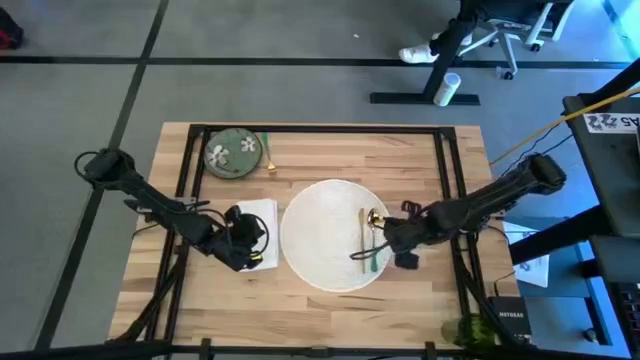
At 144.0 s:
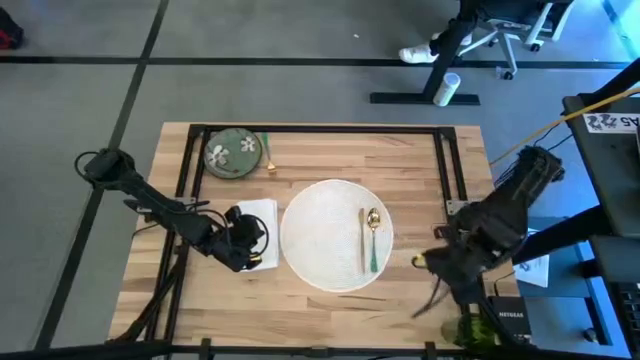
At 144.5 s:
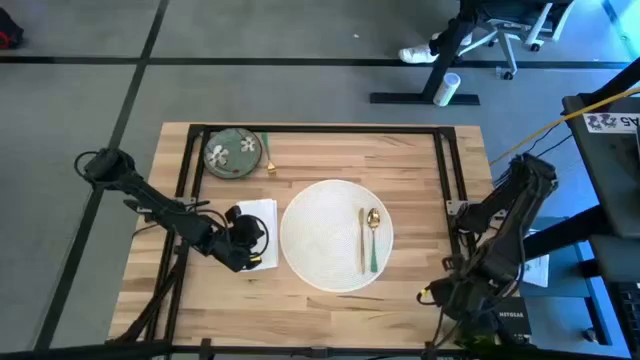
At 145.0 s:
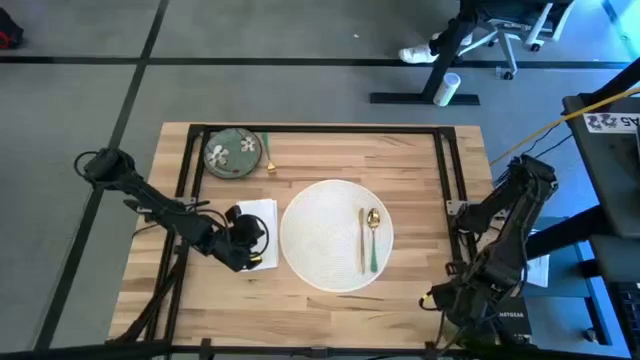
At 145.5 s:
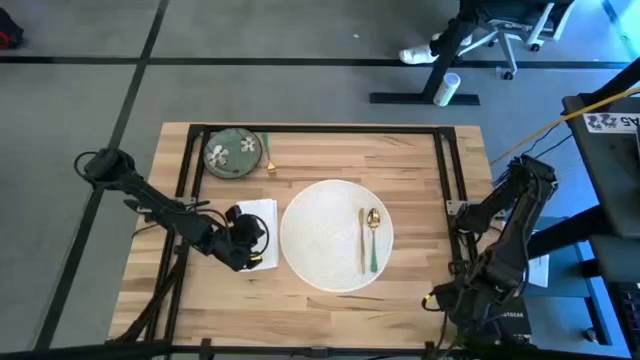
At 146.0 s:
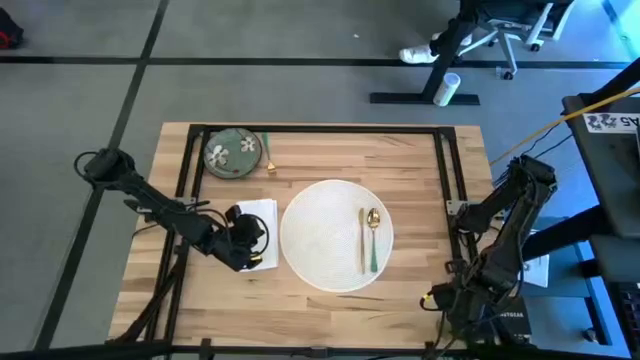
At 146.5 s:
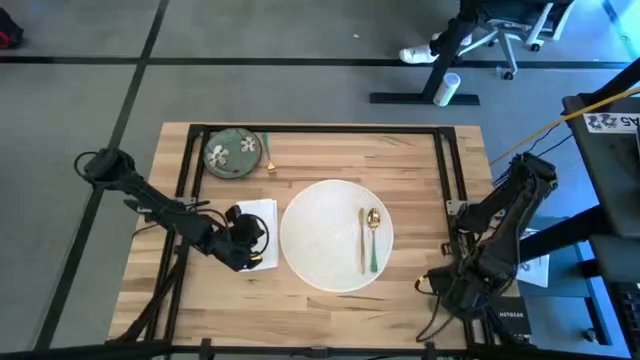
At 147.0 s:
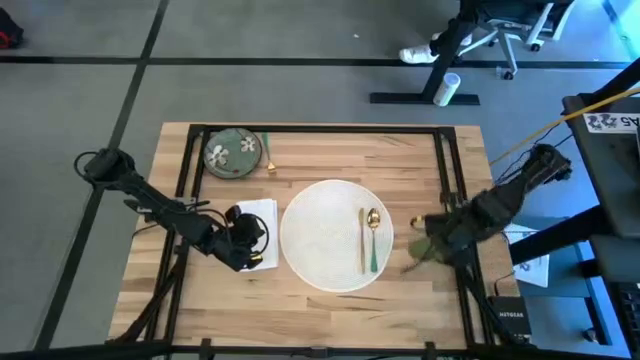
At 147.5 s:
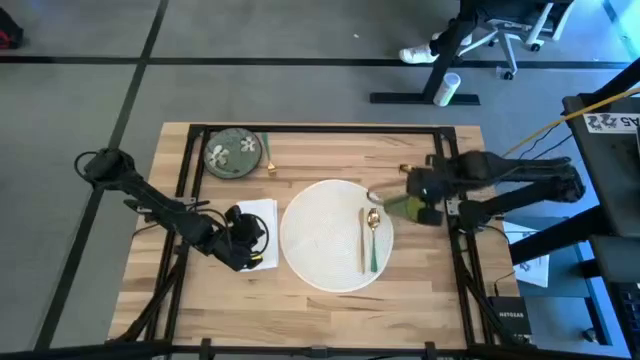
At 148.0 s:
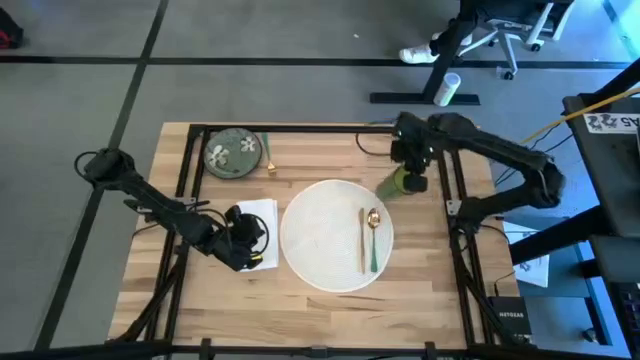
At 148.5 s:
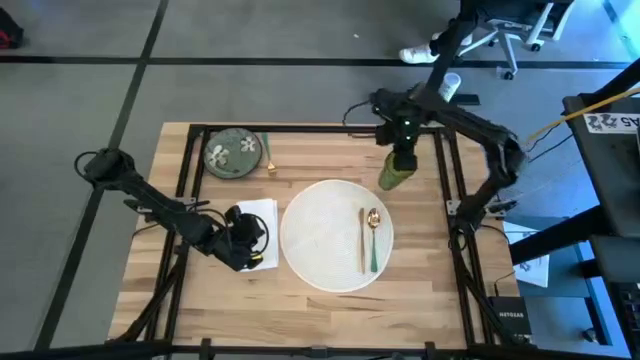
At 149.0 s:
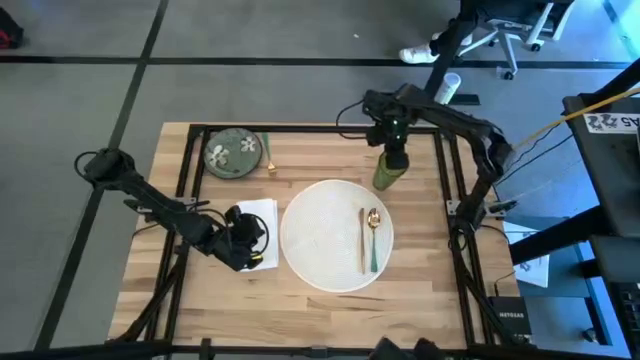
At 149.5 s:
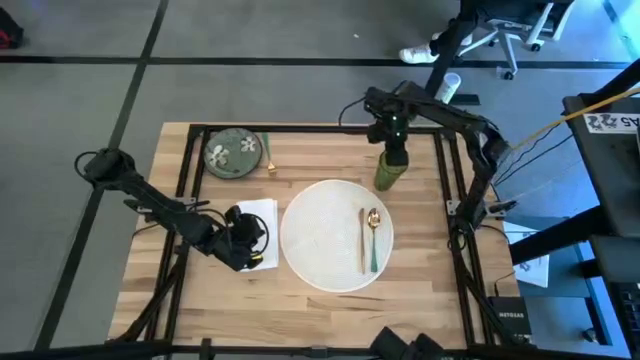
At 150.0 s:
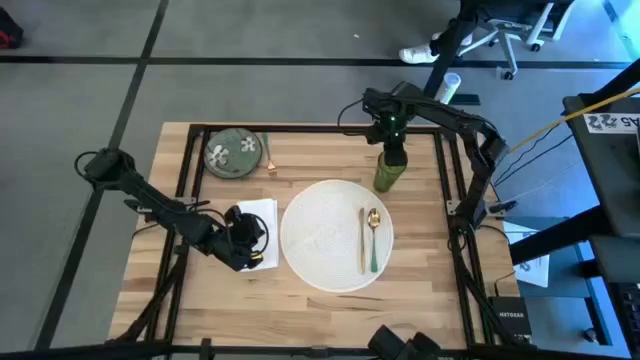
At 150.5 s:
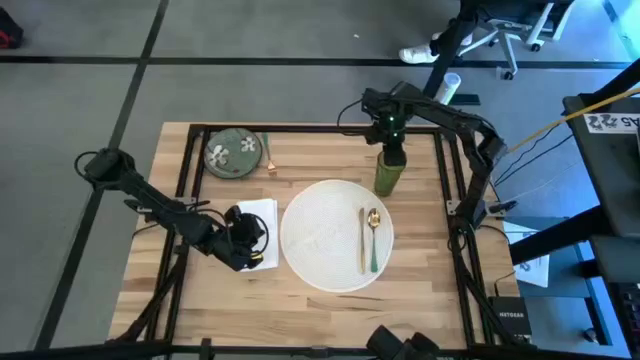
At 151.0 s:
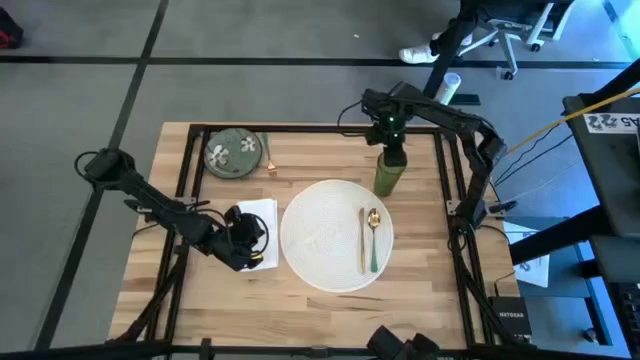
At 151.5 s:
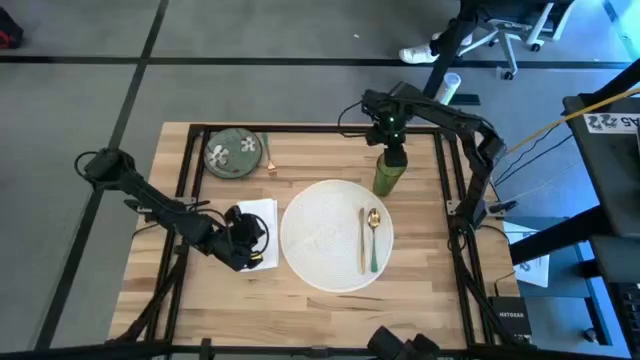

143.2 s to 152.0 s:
Task: Set table place
Move the green cup to the top right of the white table mat

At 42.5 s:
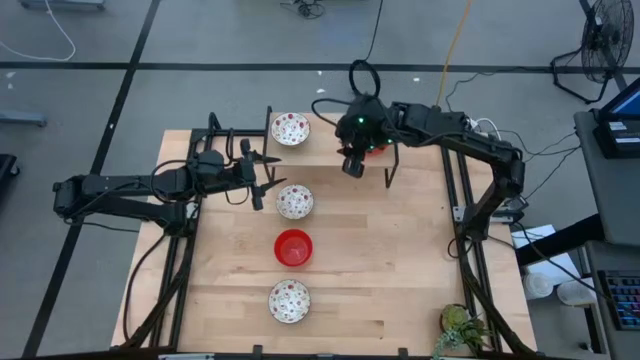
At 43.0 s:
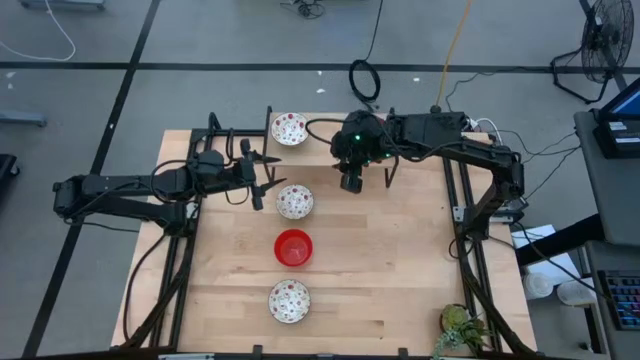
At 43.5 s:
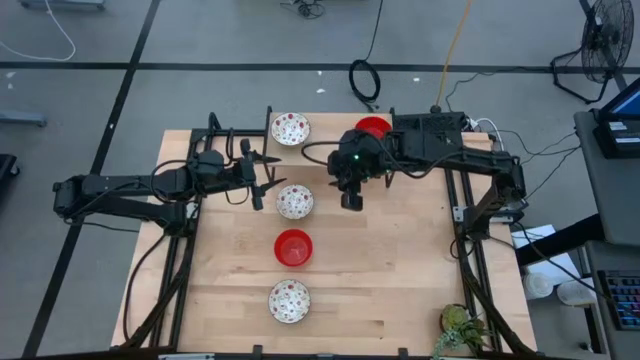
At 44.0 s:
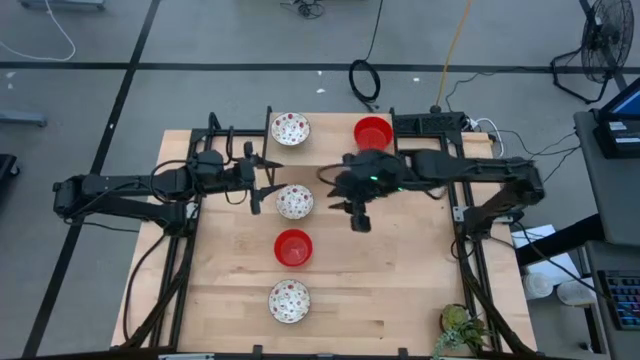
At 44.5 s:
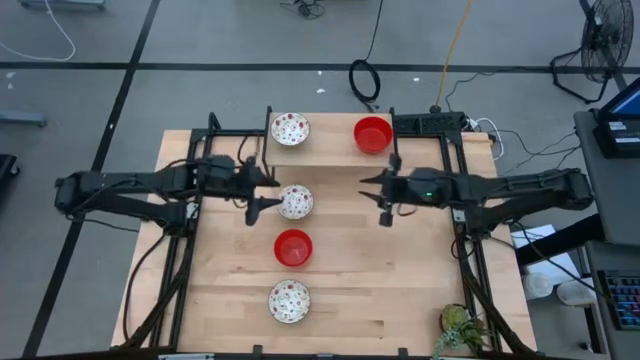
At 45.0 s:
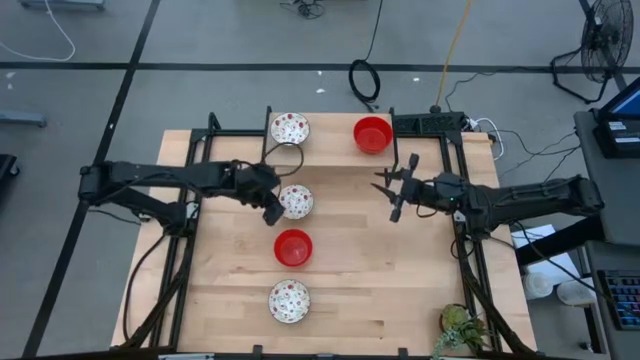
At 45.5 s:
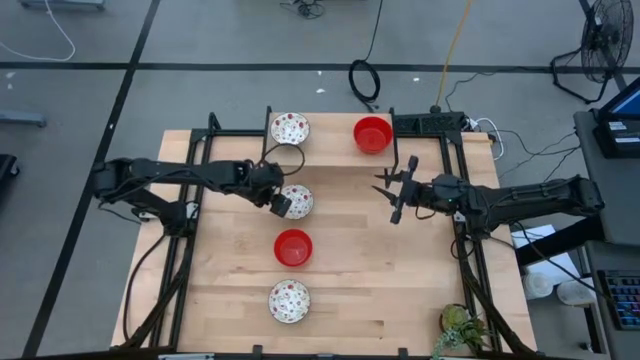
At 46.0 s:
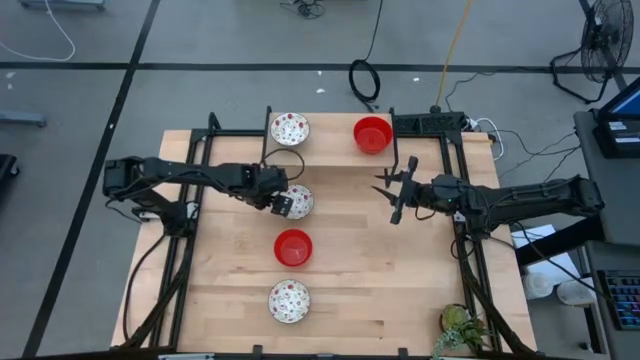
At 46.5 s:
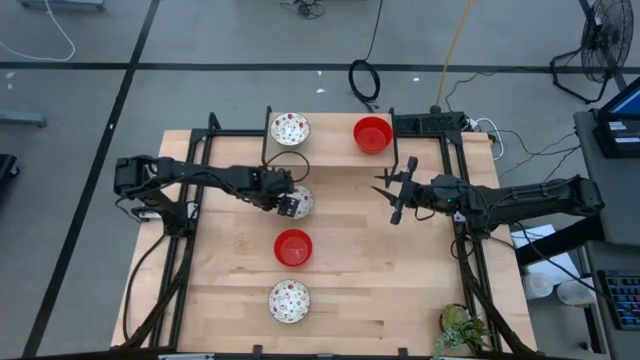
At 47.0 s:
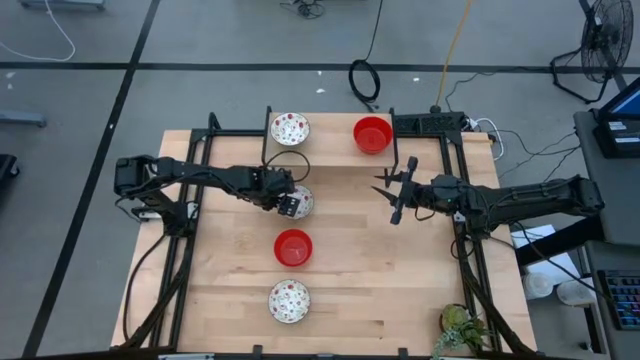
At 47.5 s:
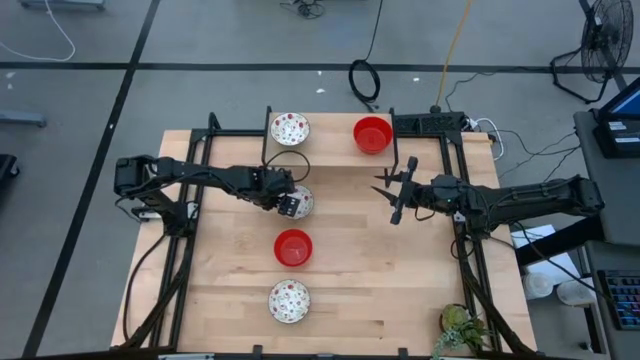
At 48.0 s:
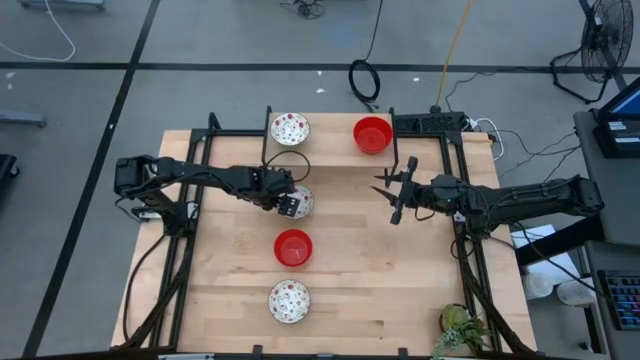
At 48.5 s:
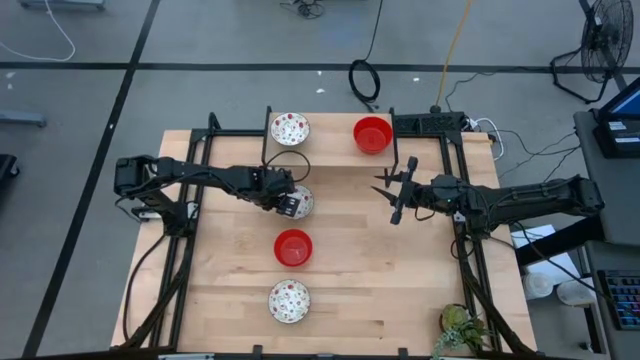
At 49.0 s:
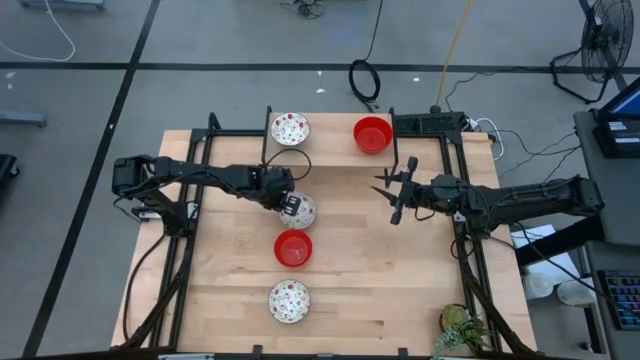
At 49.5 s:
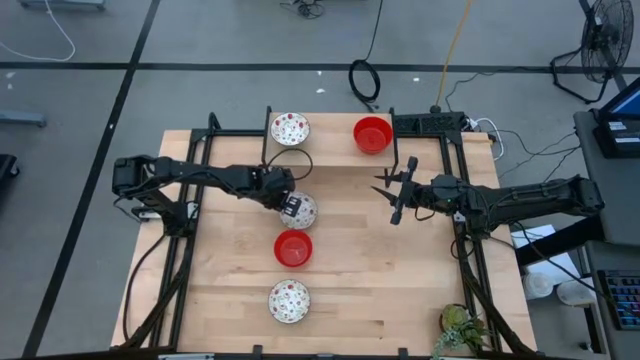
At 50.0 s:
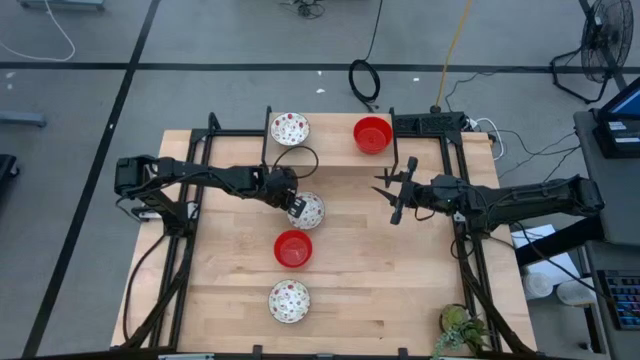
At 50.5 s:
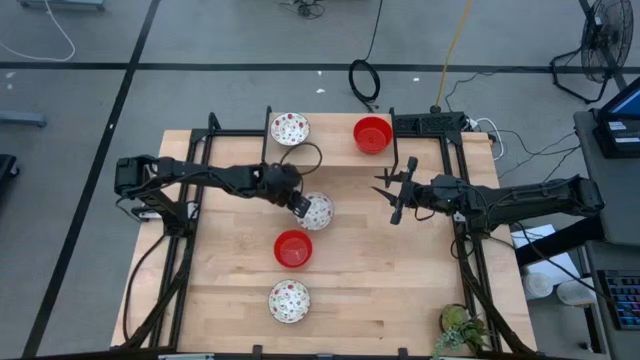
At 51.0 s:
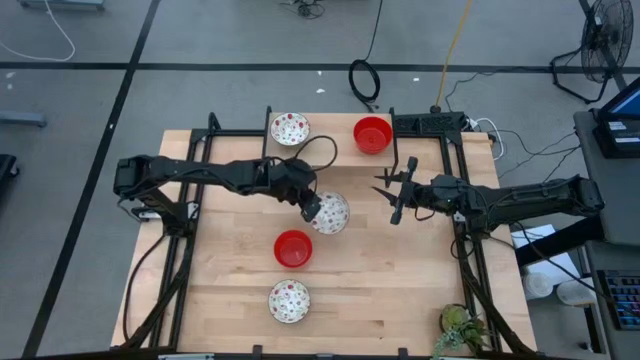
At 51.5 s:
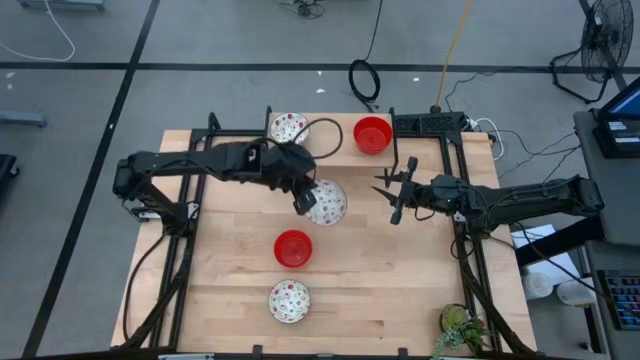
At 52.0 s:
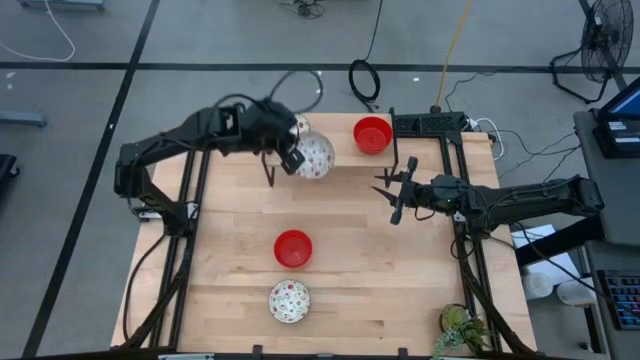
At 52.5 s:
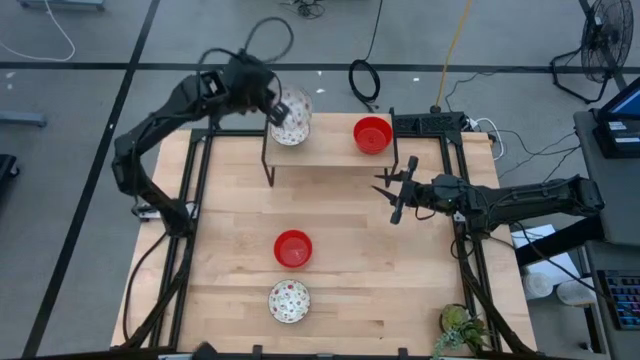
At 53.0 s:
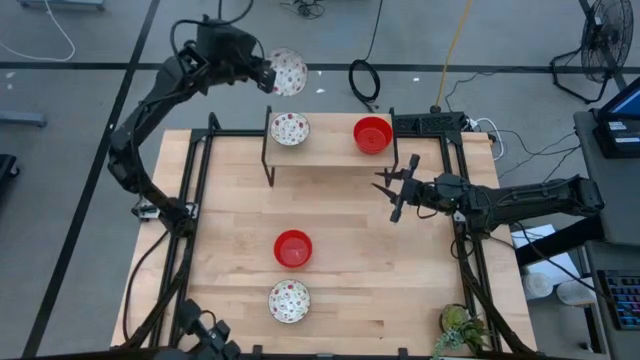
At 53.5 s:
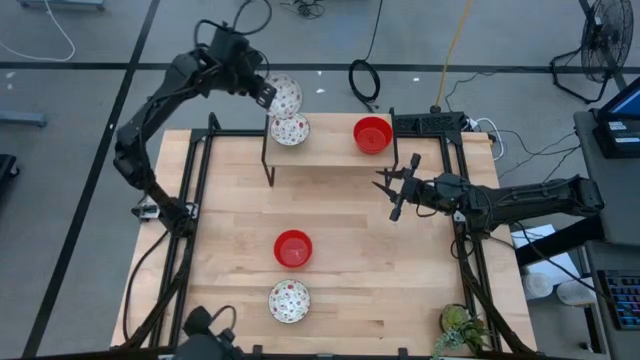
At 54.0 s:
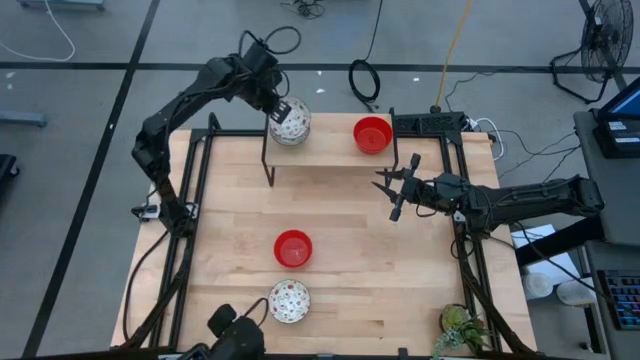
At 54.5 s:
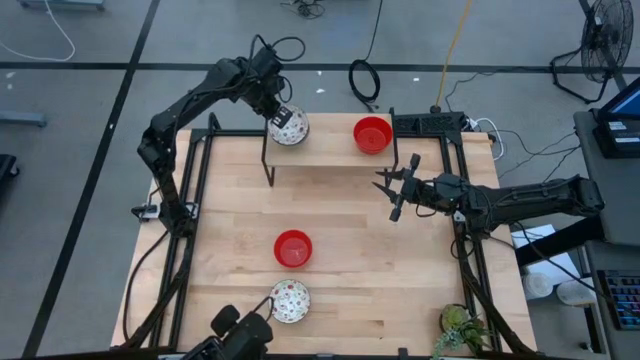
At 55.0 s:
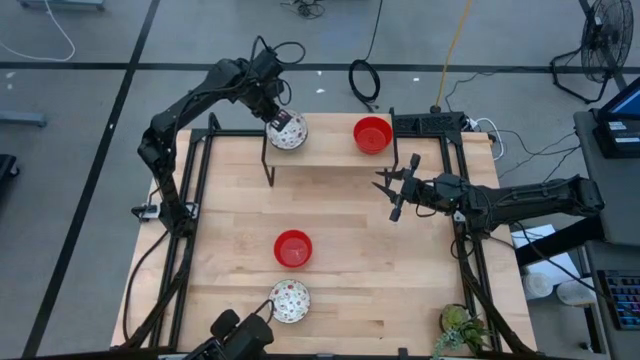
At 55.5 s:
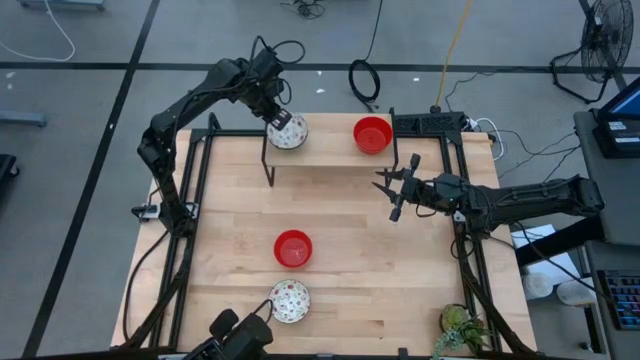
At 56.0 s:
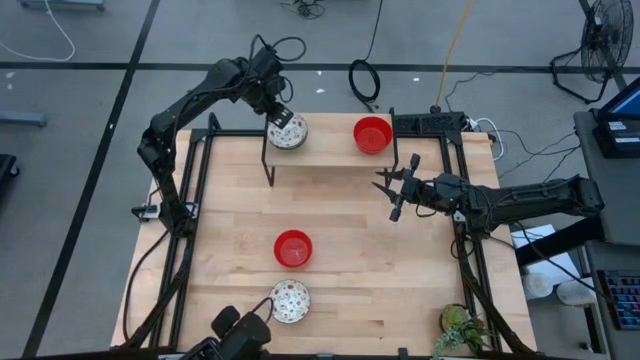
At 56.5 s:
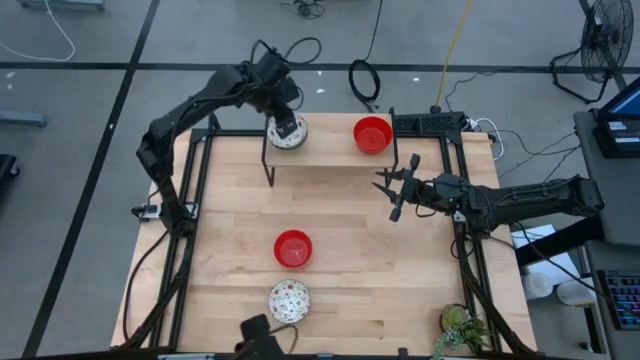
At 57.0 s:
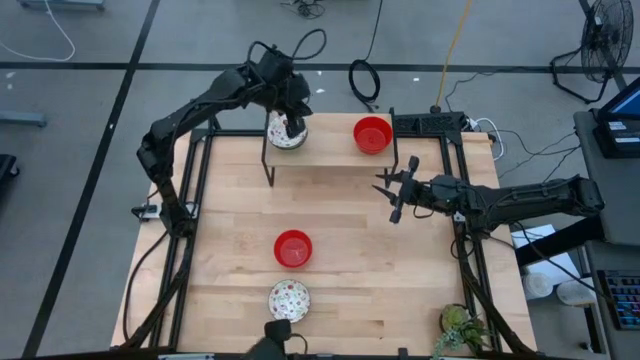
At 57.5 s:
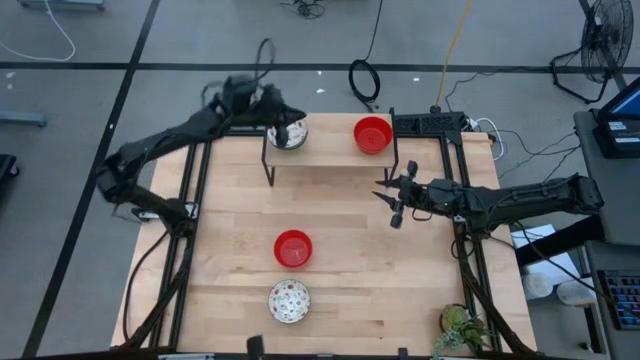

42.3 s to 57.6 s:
Task: Pick & Place Mini bowls
Stack the top white patterned bowl on the white patterned bowl on the shelf
